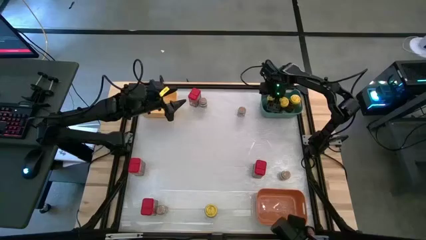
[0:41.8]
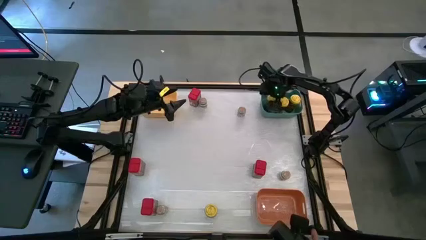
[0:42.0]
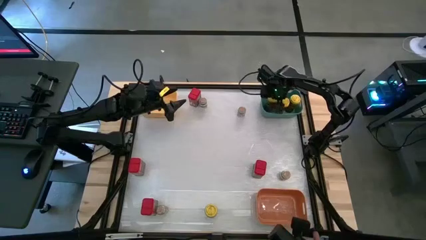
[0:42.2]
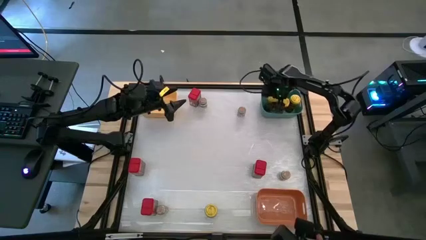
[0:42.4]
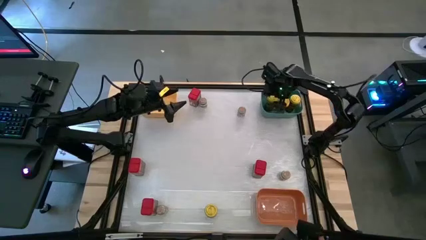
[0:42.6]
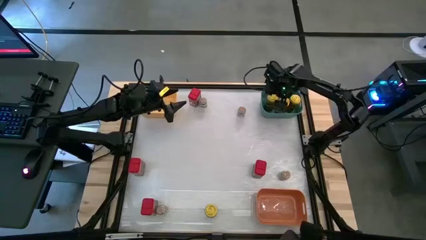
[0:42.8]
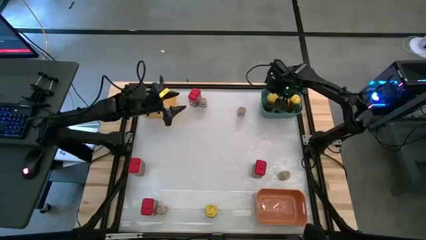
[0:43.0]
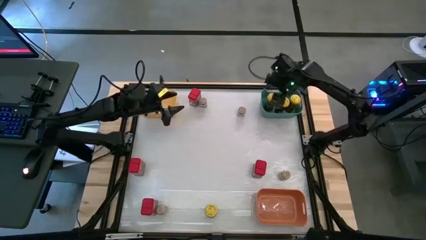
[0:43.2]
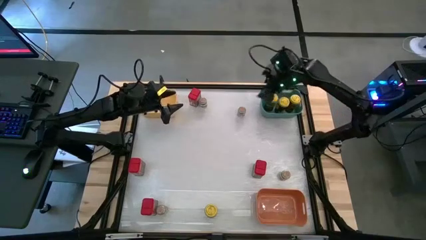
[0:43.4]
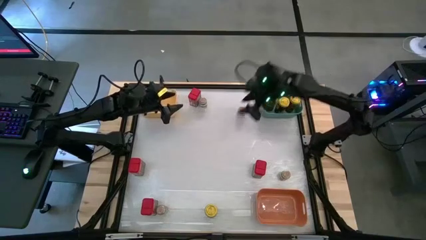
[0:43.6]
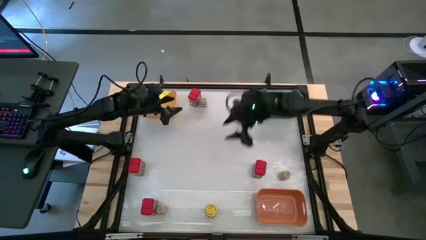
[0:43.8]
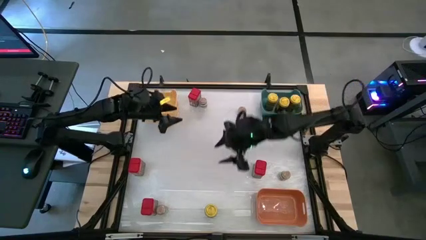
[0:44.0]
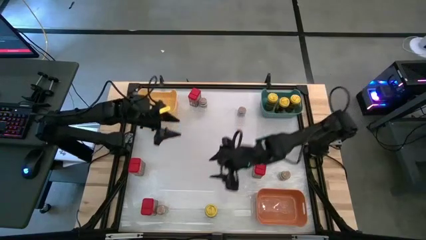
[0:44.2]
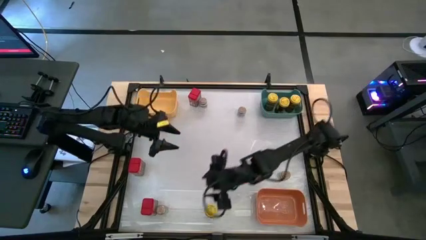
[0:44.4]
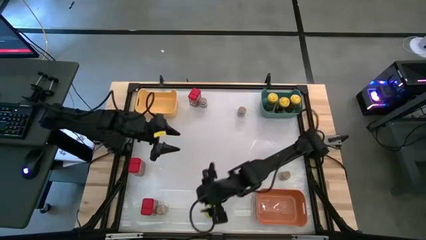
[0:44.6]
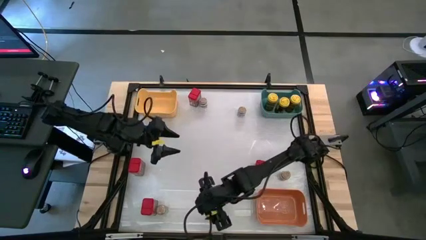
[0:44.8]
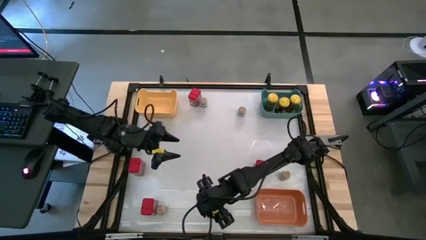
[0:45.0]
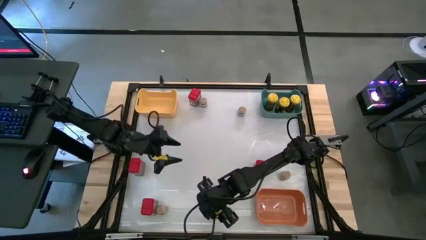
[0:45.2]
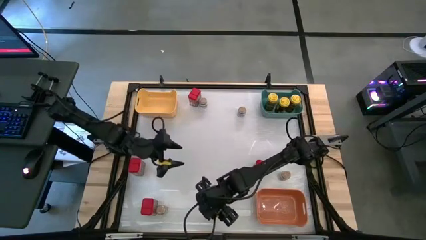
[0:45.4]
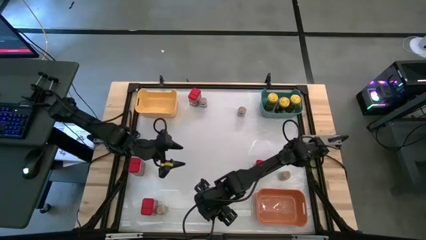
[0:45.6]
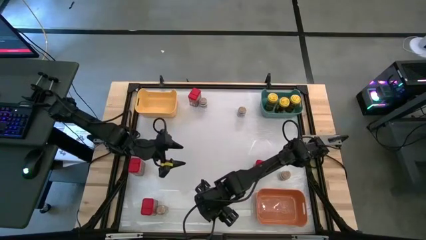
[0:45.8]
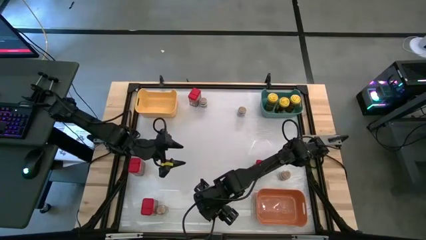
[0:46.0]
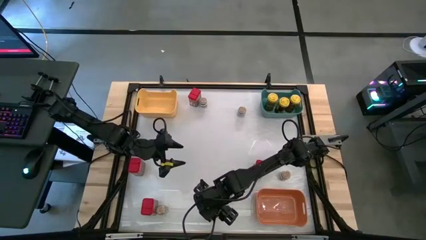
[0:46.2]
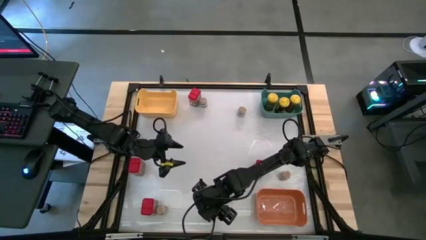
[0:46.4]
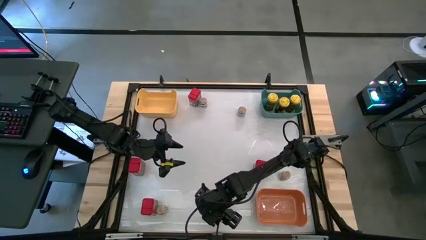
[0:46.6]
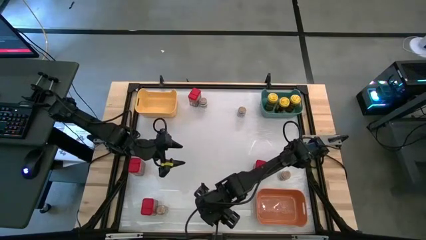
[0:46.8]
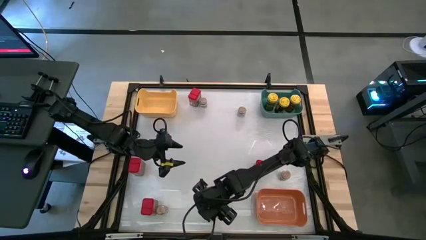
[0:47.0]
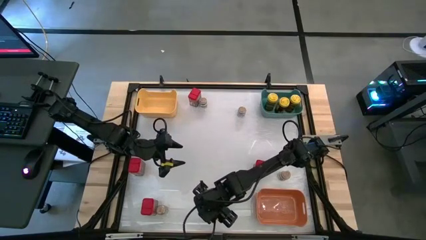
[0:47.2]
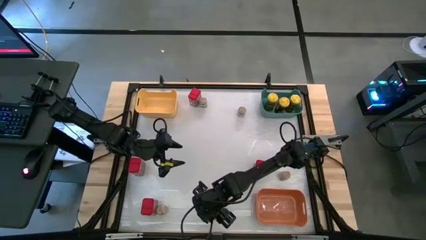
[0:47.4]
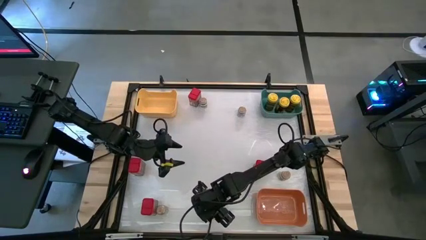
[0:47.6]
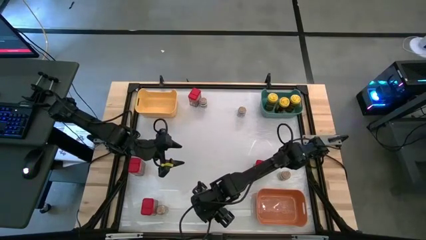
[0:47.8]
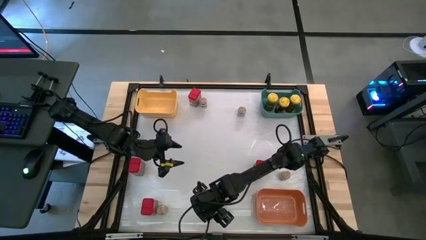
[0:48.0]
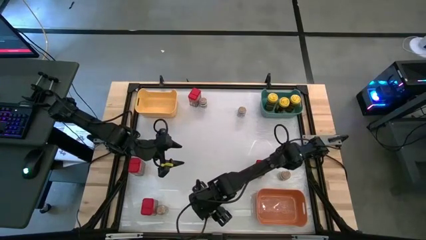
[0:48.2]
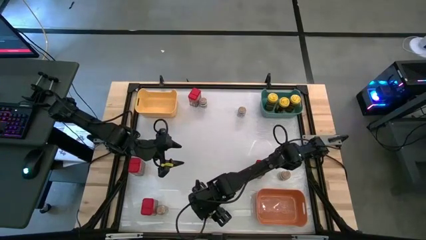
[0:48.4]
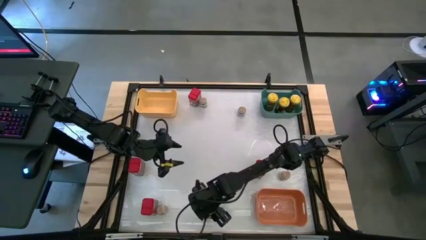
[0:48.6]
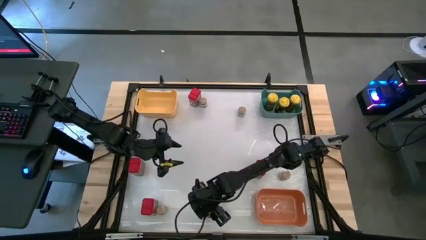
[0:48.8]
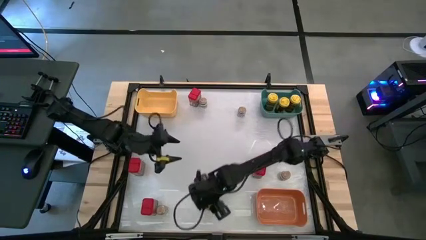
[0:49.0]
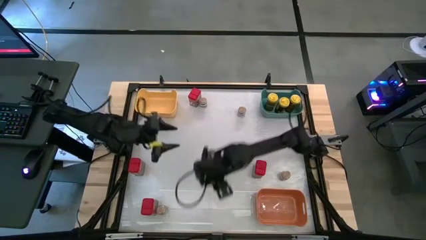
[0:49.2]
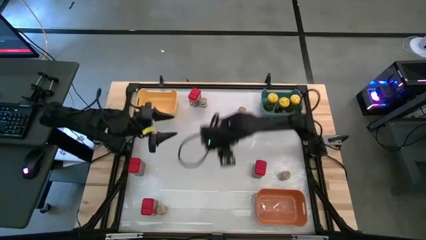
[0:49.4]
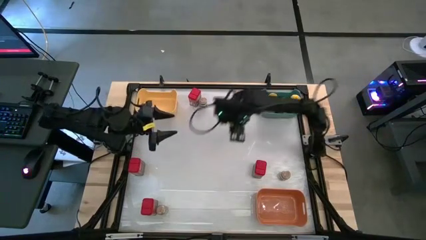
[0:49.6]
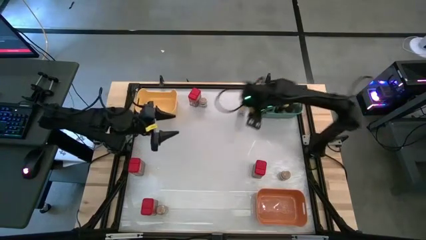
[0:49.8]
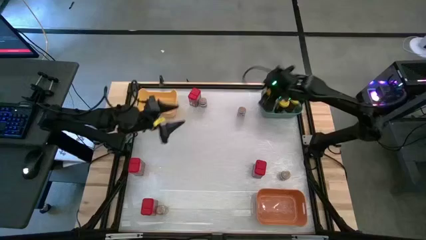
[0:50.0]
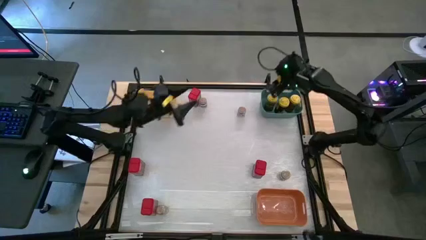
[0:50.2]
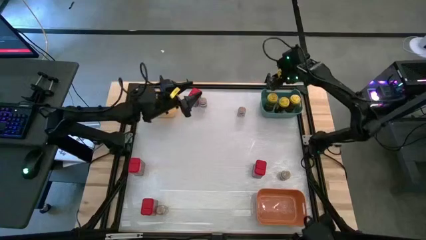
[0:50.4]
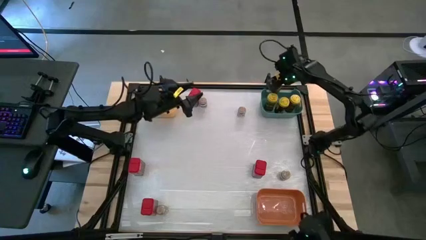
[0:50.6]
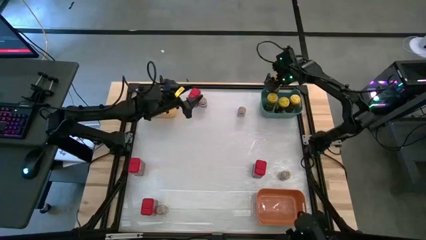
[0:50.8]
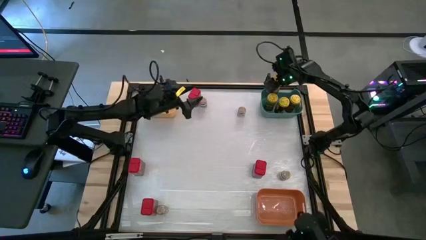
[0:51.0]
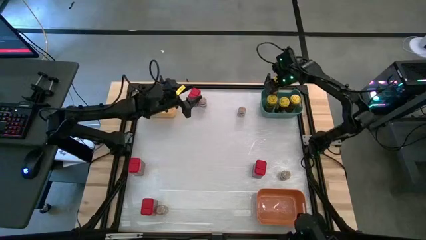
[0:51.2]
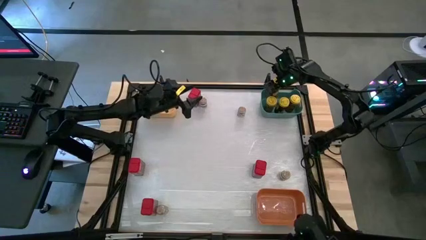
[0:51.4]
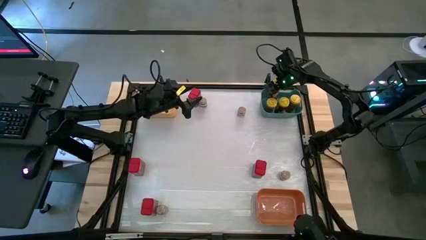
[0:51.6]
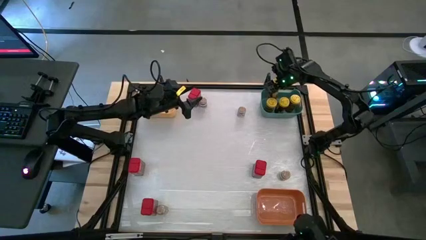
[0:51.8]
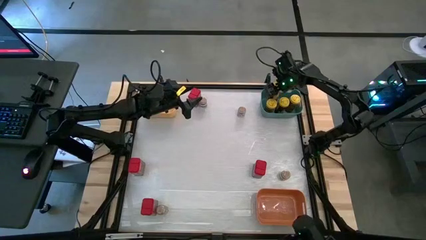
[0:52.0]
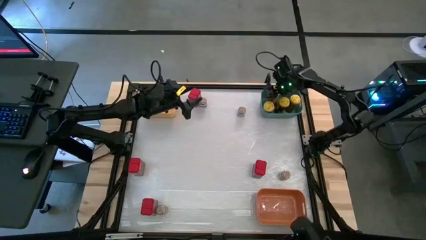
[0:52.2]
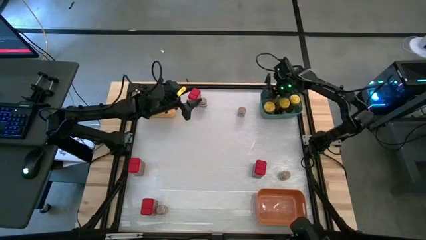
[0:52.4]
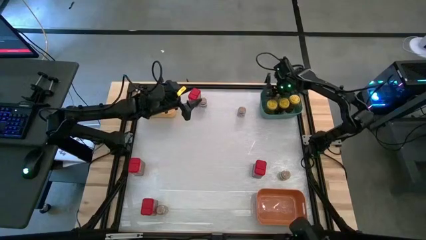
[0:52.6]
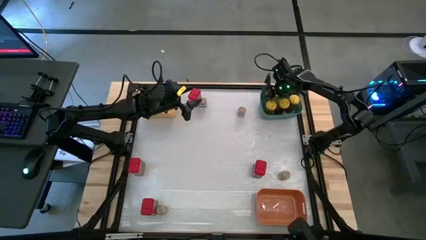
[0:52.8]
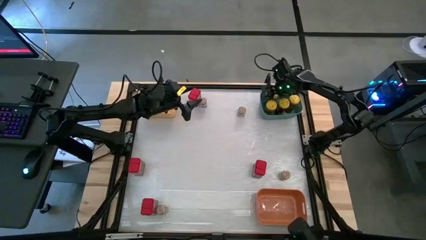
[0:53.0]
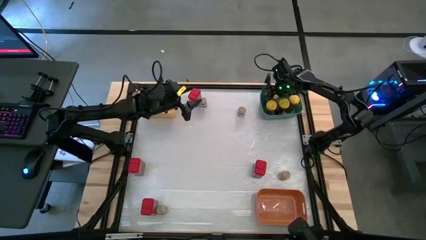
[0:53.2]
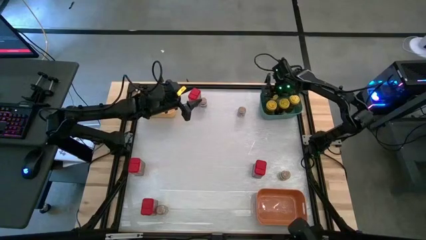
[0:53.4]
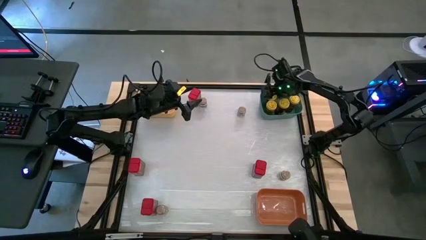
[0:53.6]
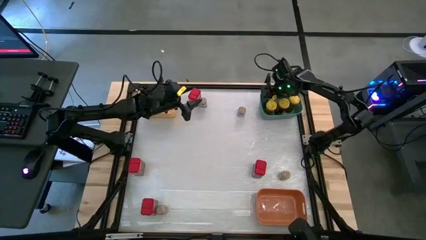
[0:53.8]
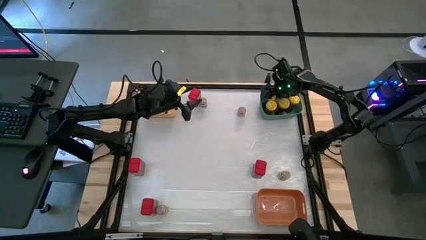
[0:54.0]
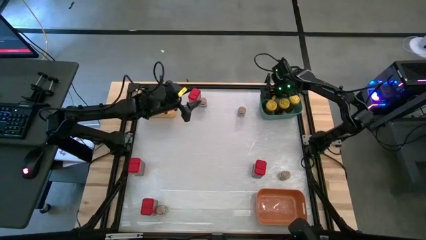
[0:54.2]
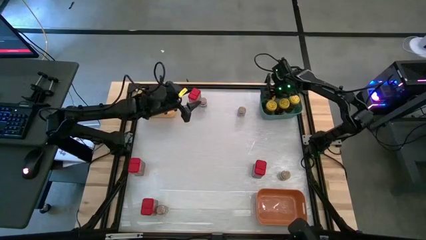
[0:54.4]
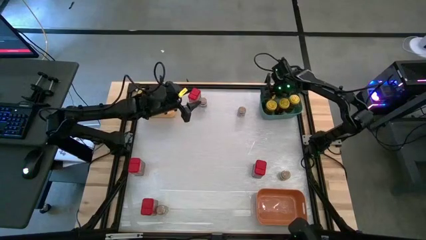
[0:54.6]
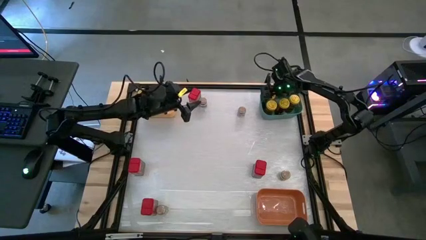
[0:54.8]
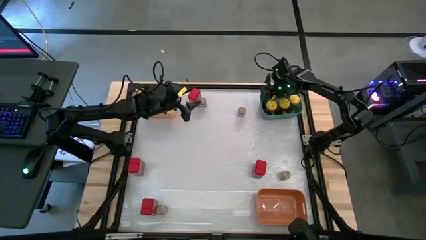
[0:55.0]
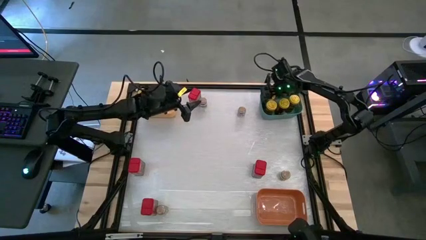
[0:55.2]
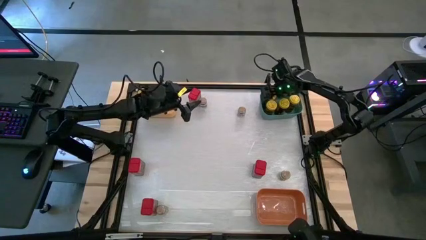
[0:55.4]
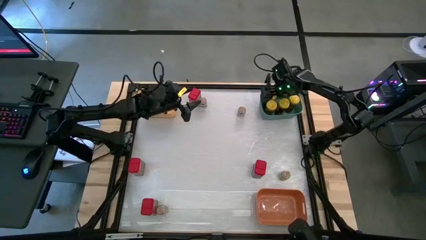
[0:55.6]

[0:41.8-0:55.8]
Task: Sort spices by type
Put the yellow seasoning bottle into the green bin

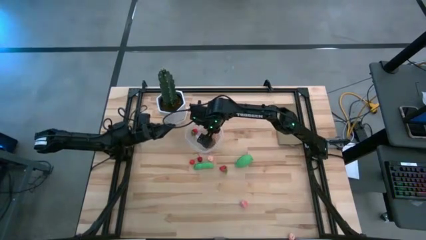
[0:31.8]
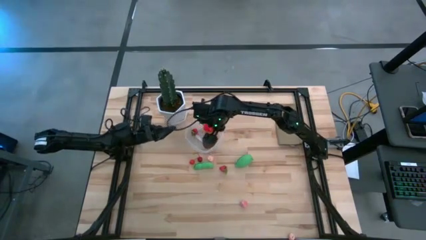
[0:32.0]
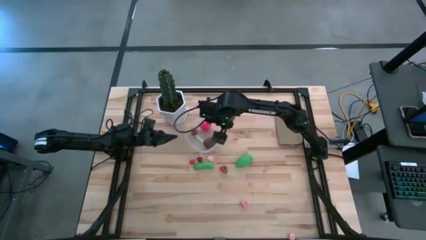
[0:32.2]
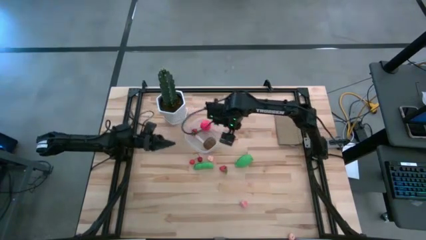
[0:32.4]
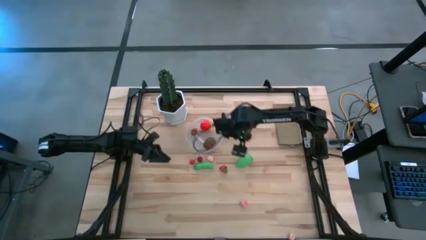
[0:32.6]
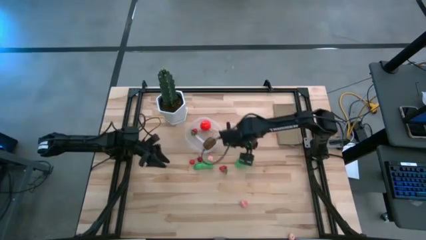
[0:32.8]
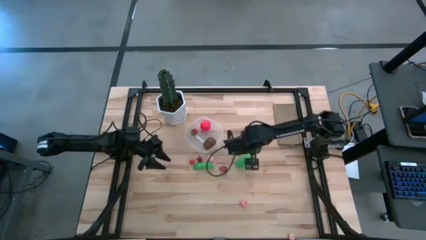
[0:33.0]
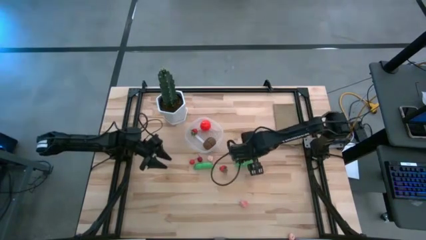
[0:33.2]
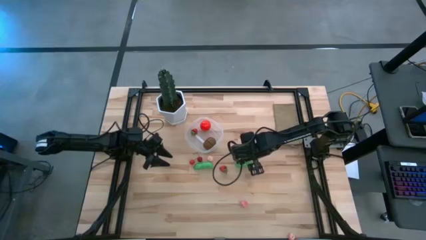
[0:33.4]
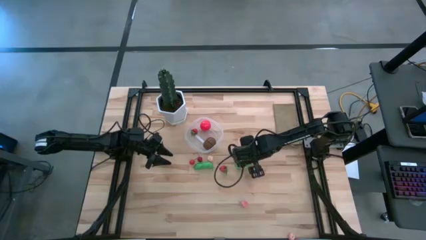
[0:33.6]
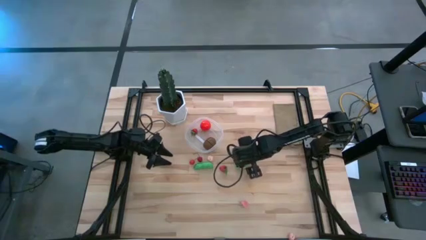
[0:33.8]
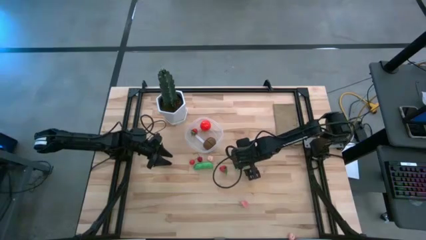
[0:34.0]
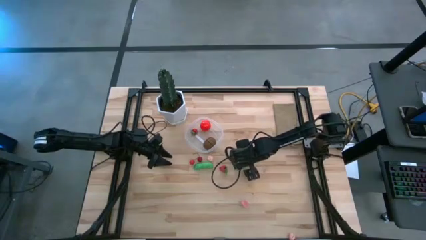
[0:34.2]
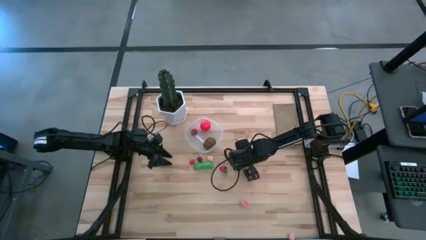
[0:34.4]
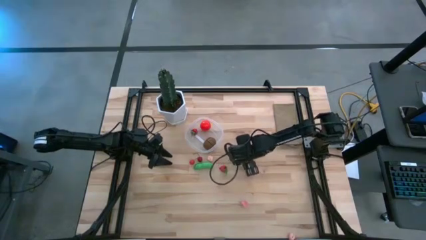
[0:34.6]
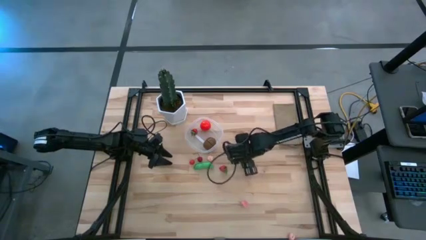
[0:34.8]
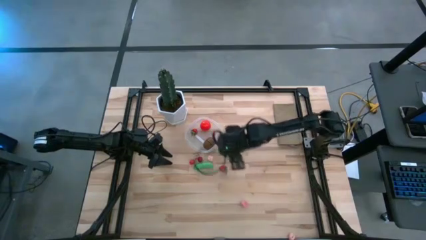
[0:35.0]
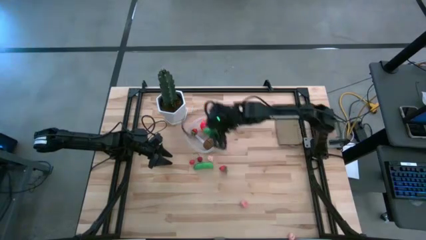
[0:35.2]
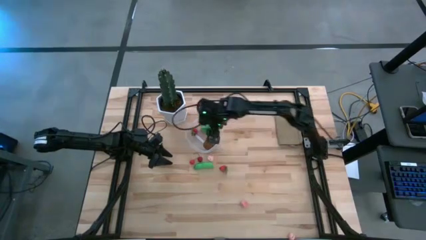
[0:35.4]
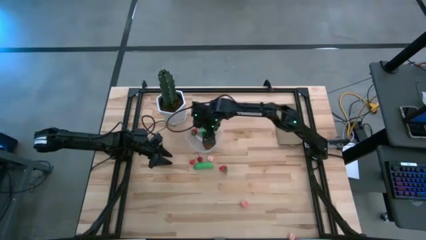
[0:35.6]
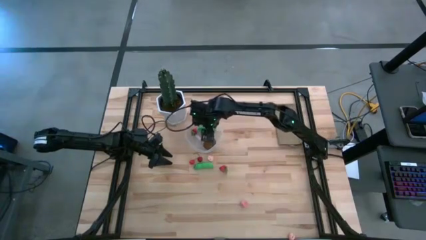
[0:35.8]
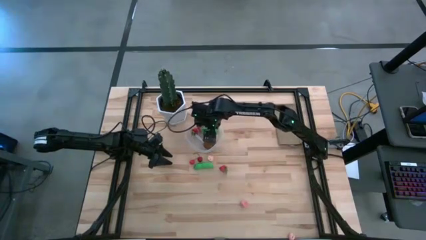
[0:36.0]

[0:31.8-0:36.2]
Task: Pick and placing Produce into tupperware
Put the corn into the transparent bin
